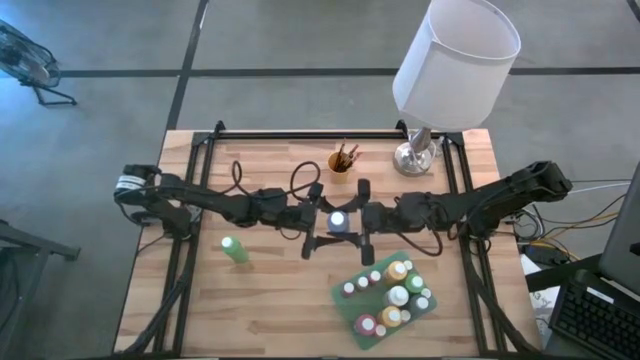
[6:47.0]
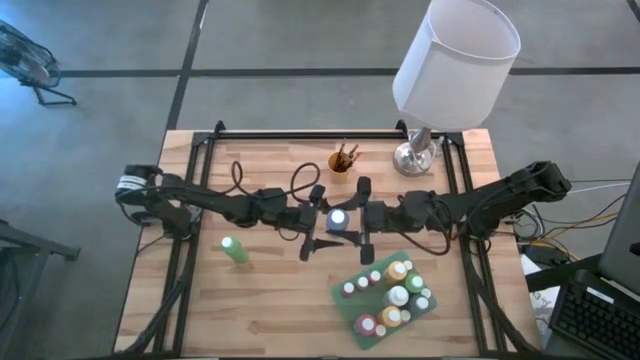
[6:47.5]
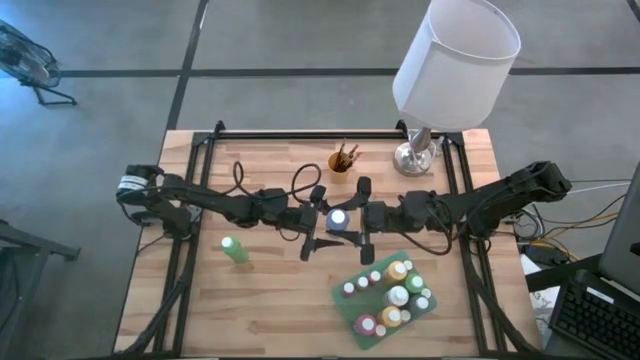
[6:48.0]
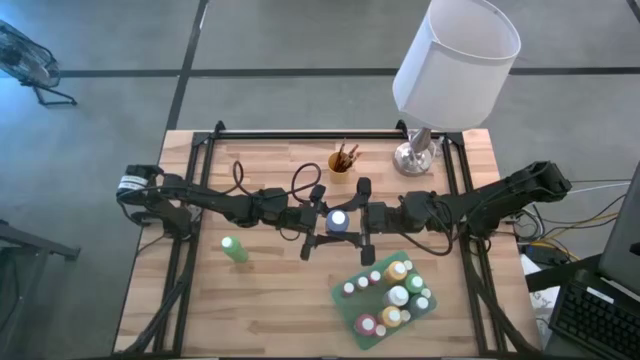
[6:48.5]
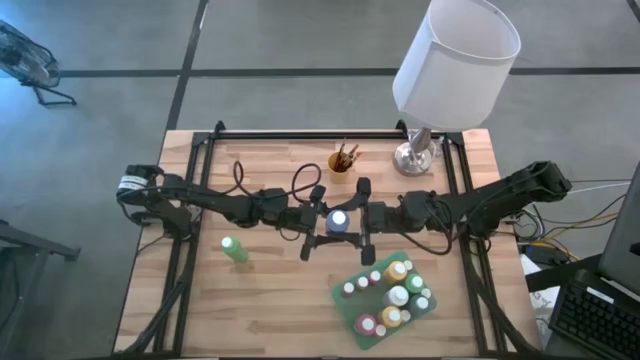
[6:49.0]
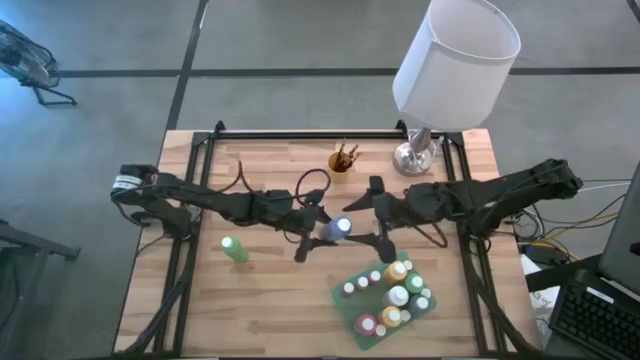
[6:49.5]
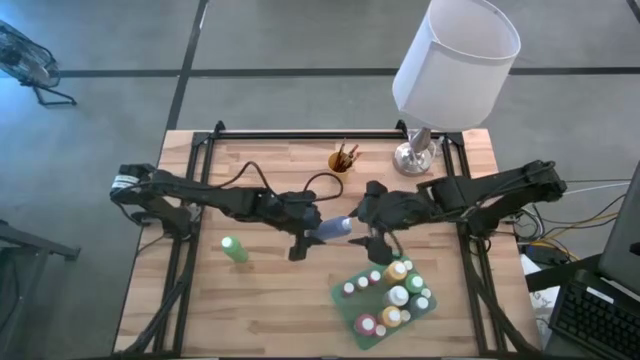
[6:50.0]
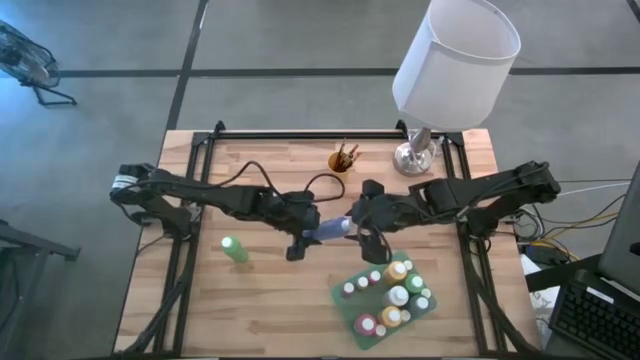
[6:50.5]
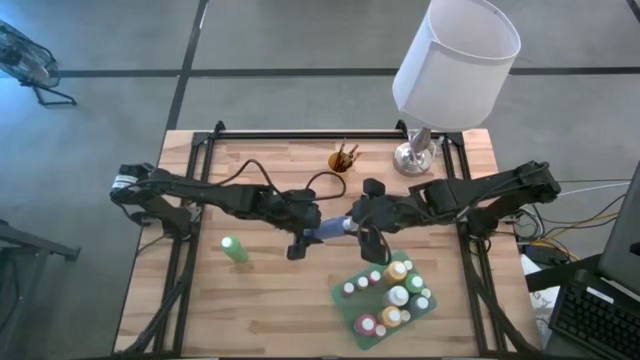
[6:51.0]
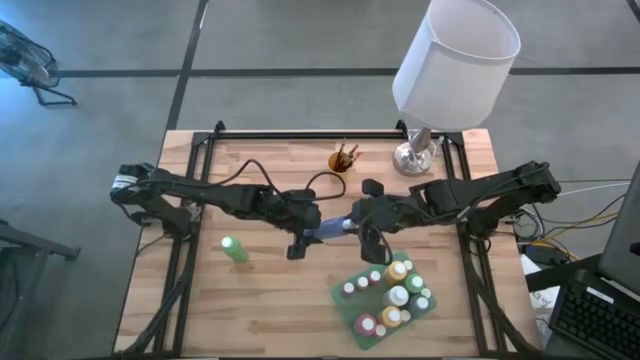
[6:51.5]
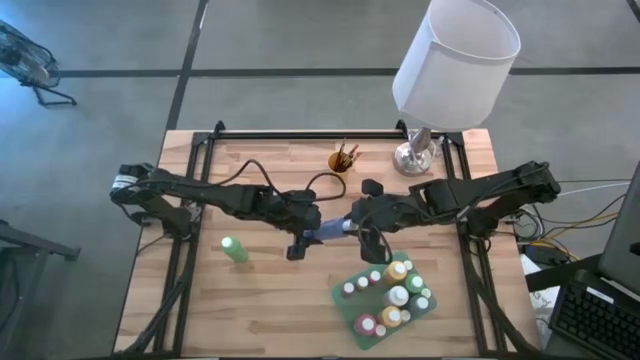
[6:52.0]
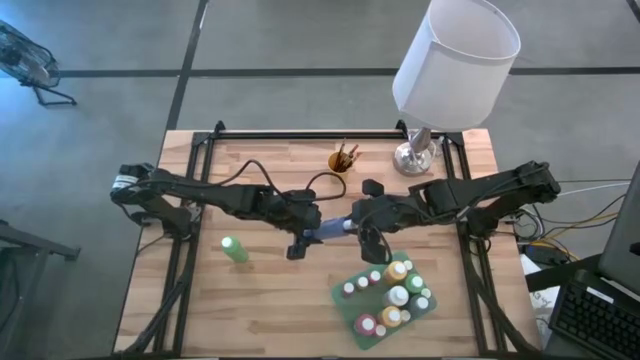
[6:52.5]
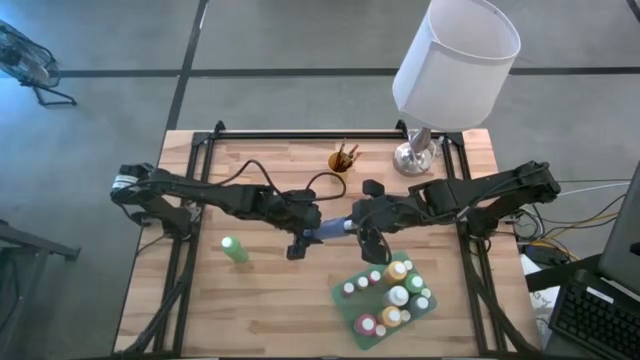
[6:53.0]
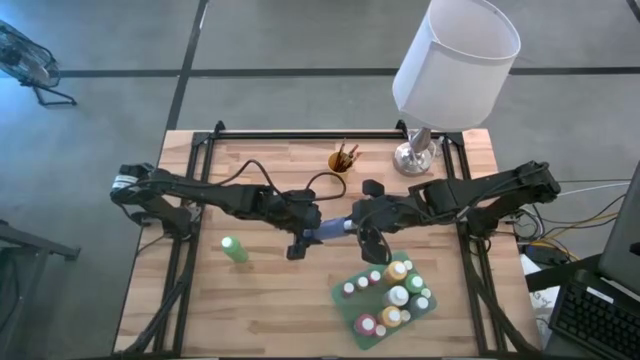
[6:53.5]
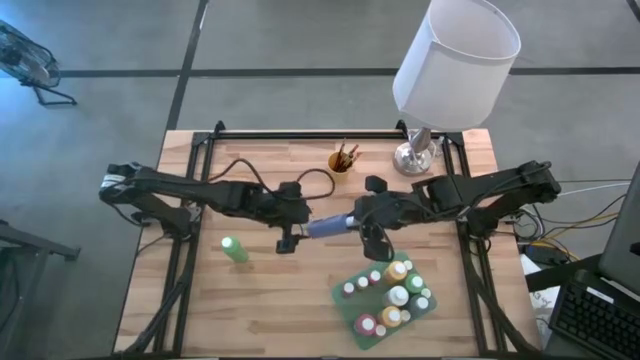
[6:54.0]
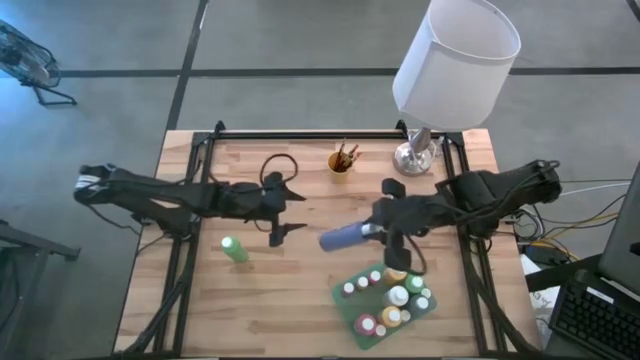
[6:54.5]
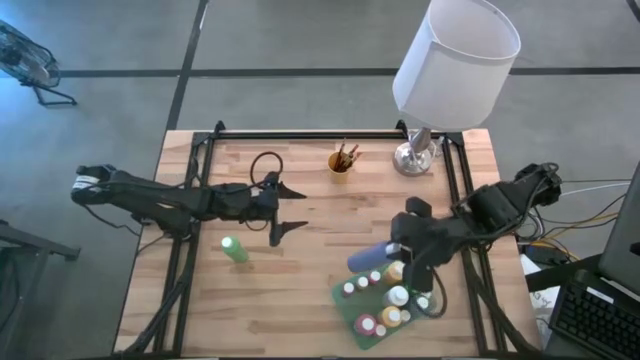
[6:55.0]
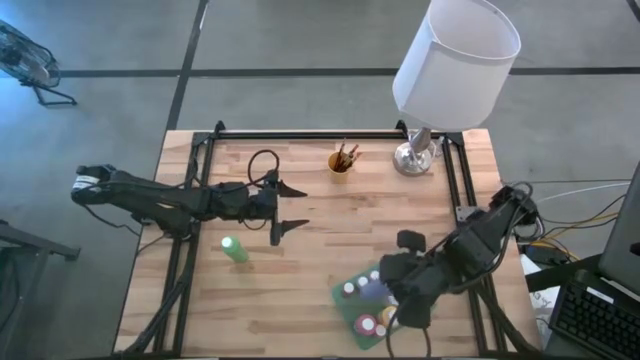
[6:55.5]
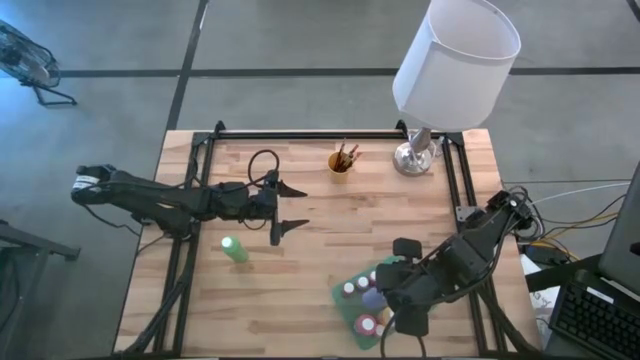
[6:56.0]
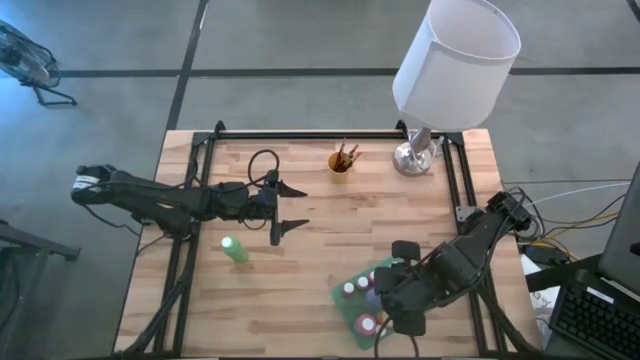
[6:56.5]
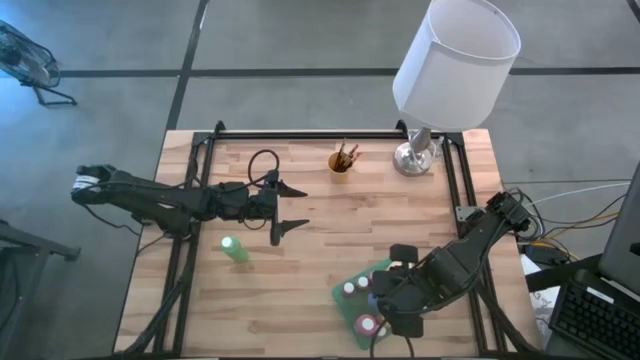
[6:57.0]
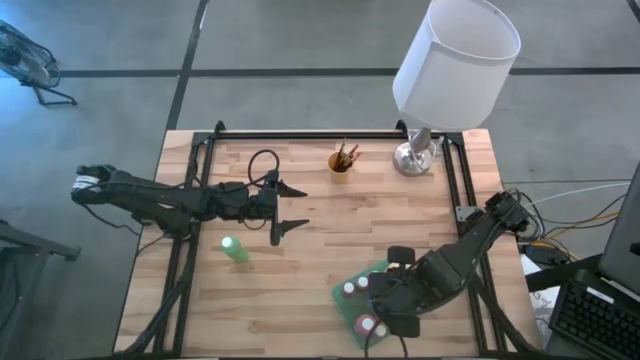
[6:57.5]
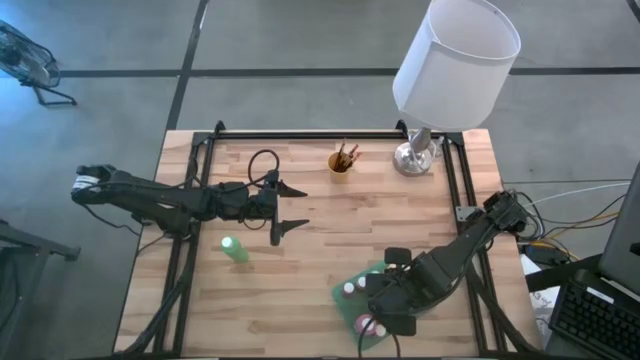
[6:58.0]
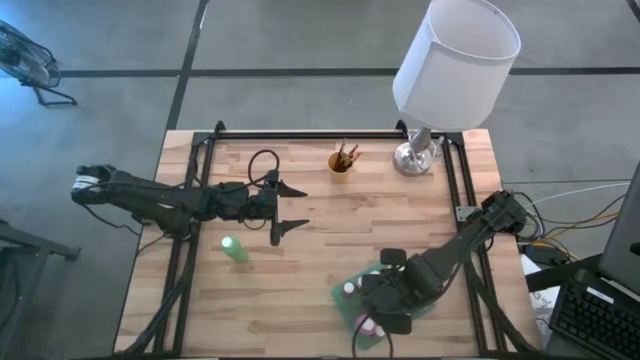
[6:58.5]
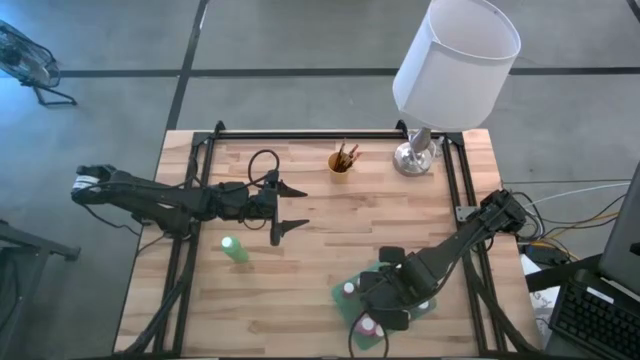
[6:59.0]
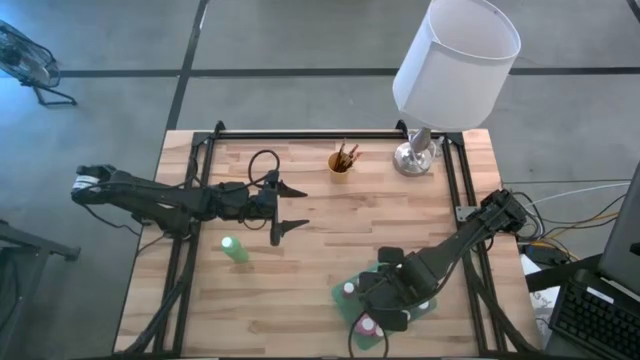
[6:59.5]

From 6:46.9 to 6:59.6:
Task: Pick & Place Paint Supplies
Put the purple paint bottle into the green bin

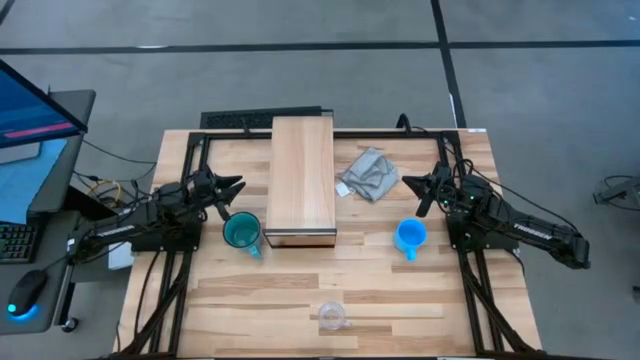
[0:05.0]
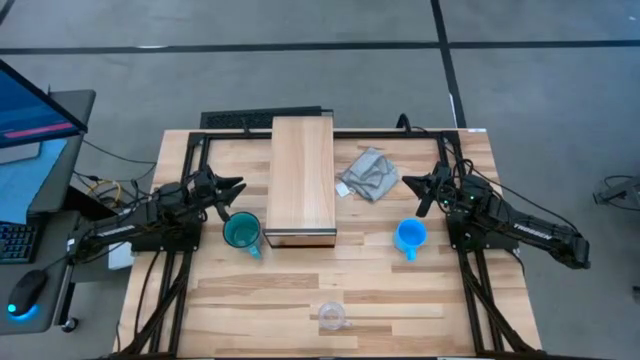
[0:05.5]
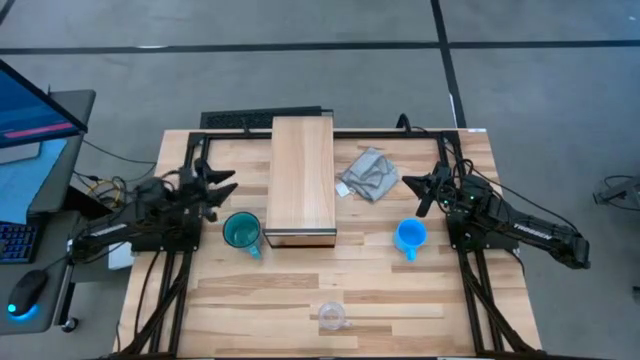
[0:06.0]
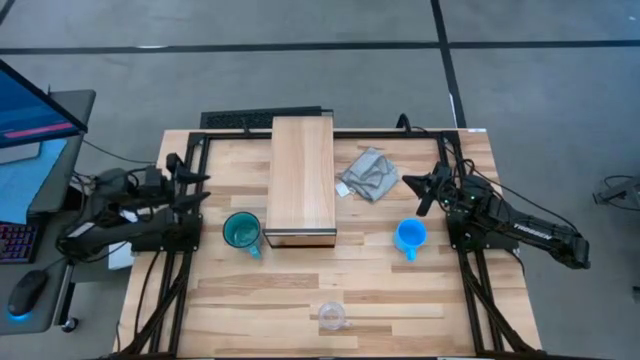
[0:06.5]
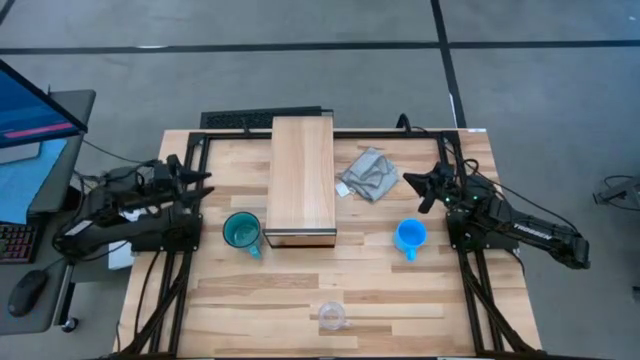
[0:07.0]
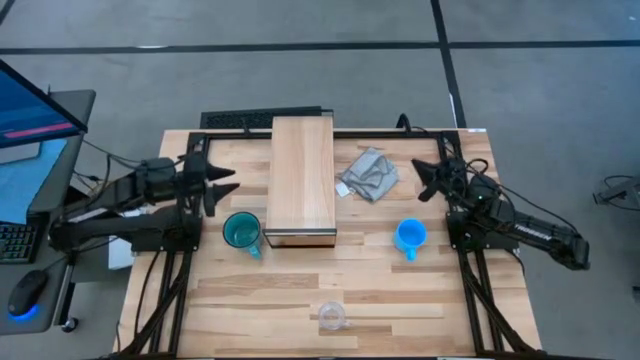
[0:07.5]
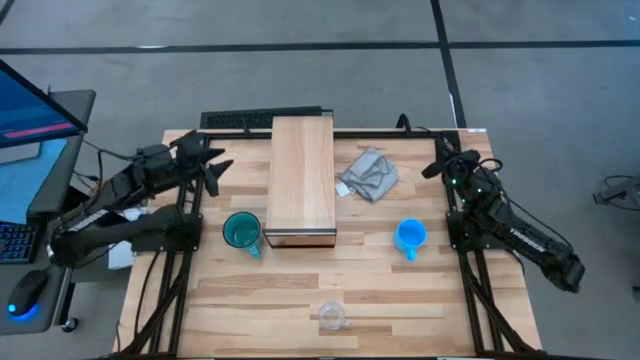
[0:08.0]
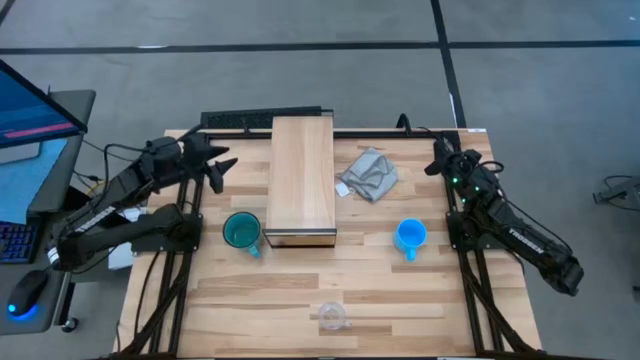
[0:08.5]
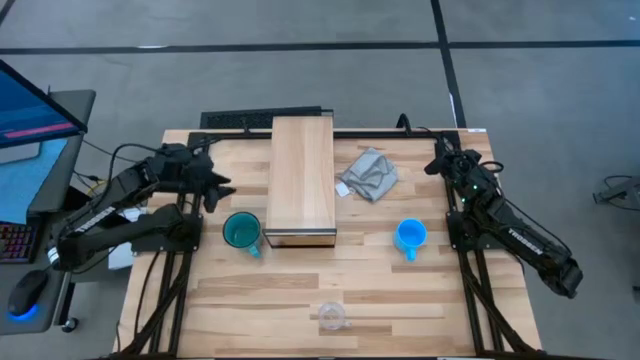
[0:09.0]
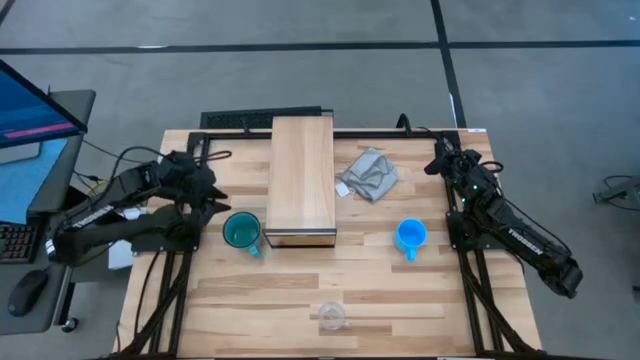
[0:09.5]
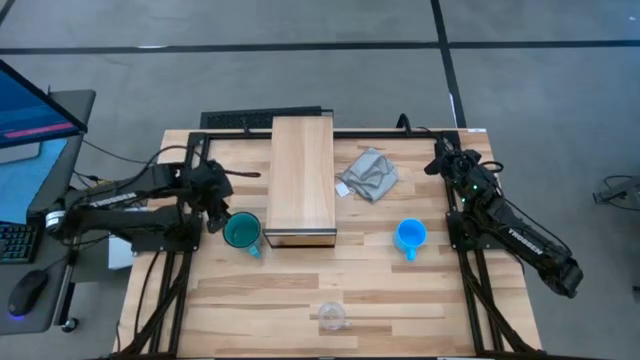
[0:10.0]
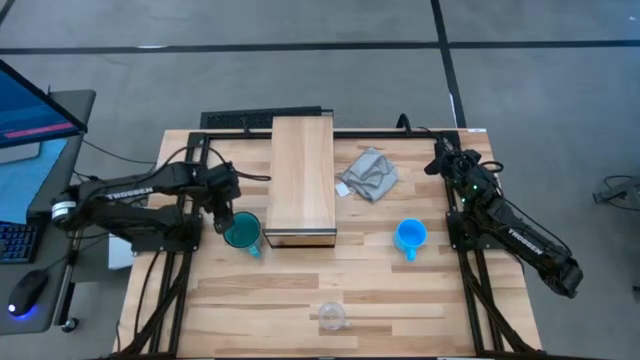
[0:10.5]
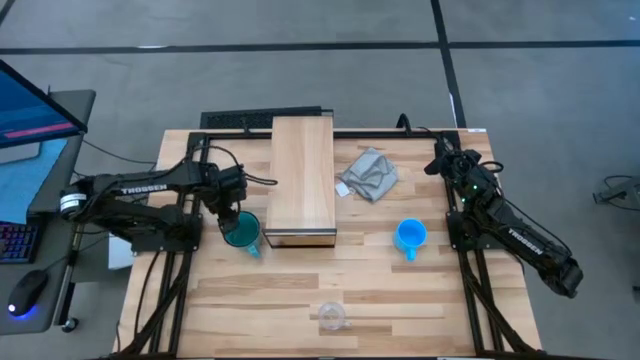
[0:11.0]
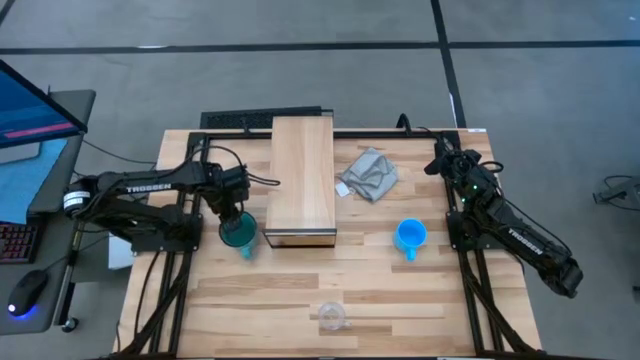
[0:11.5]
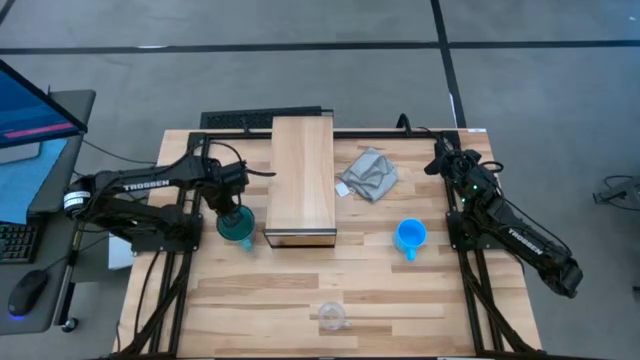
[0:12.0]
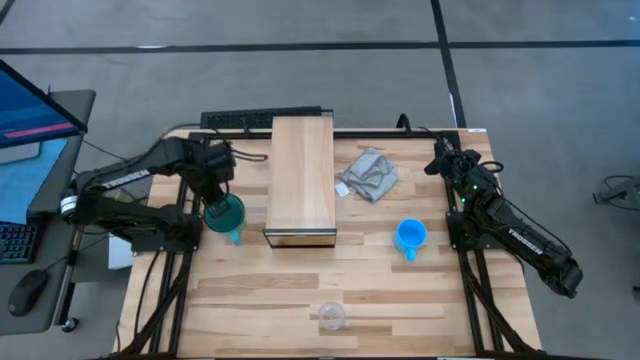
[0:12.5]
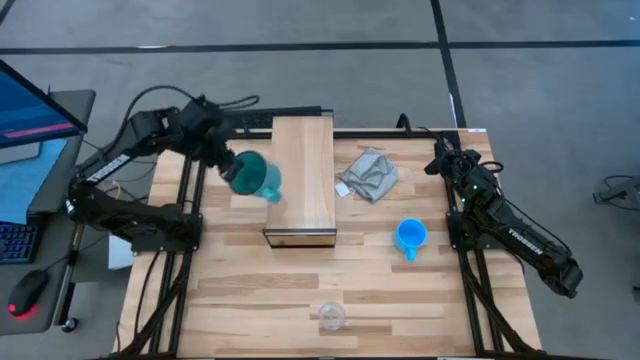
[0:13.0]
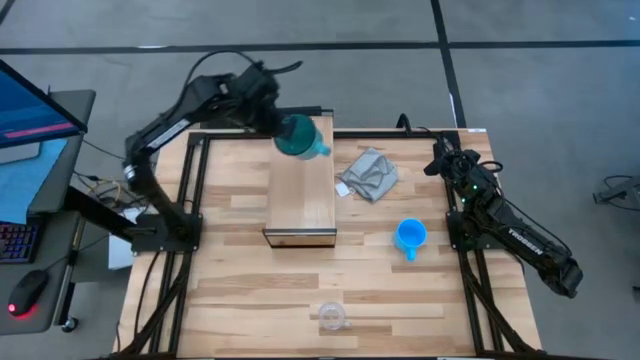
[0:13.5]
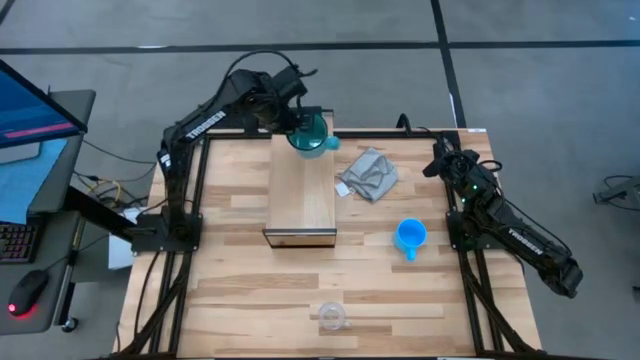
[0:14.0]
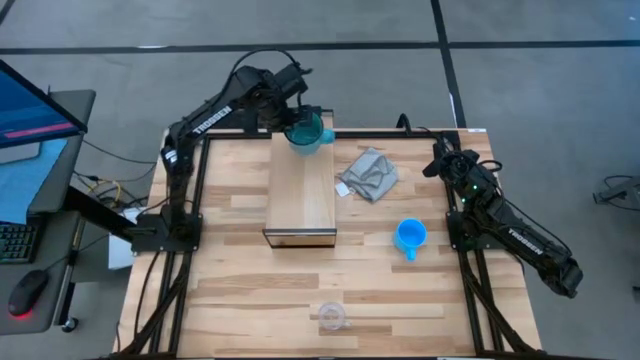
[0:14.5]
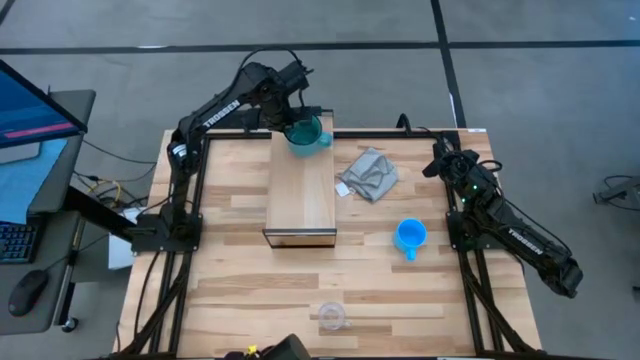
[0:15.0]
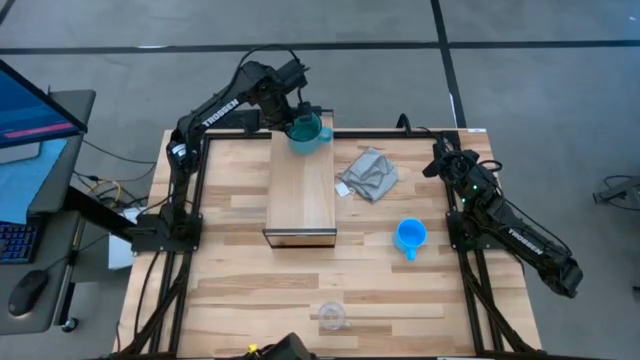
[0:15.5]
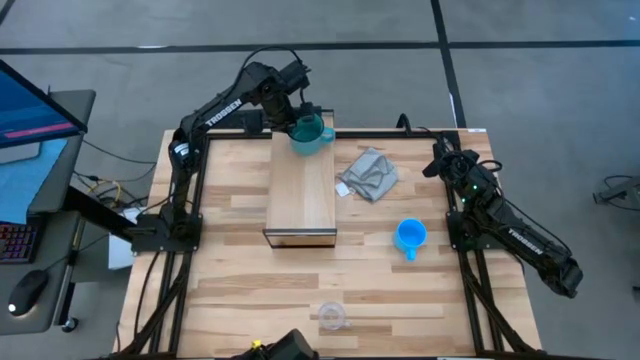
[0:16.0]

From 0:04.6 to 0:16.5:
Task: Stack small to large cups/mugs on shelf
Put the green mug on the shelf
